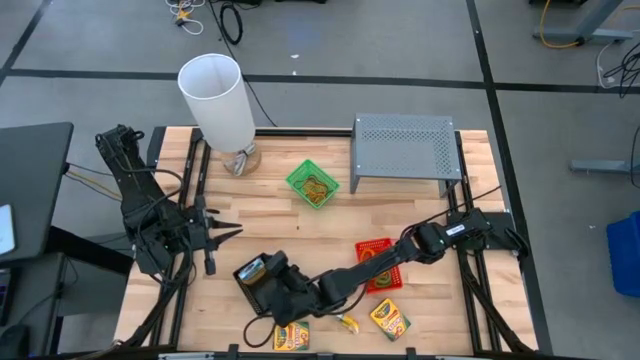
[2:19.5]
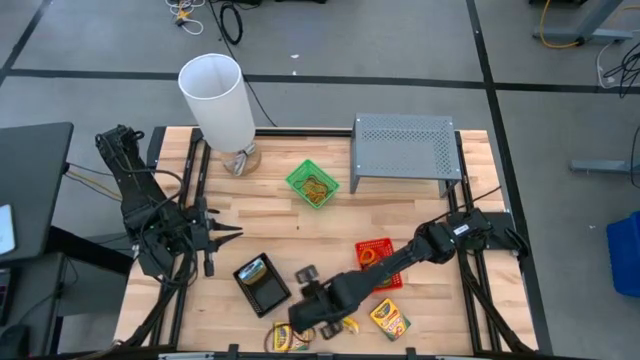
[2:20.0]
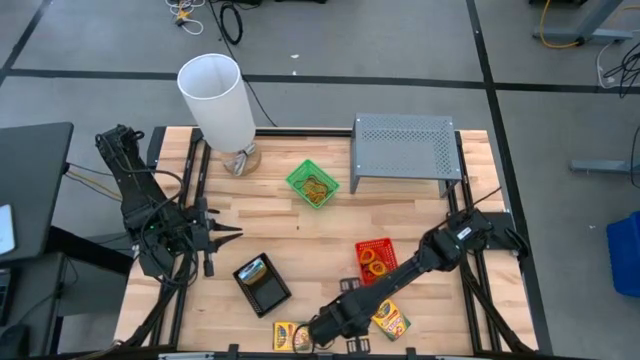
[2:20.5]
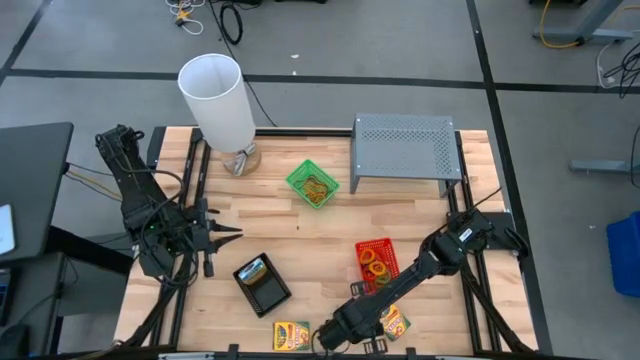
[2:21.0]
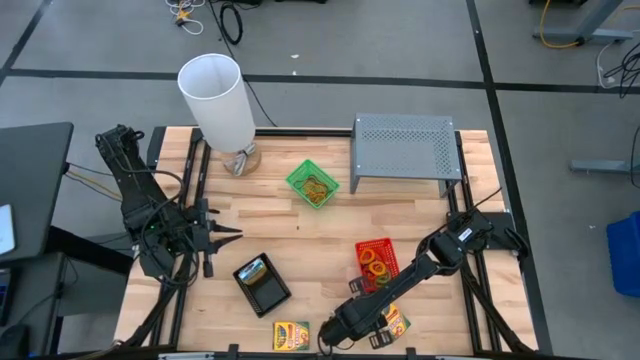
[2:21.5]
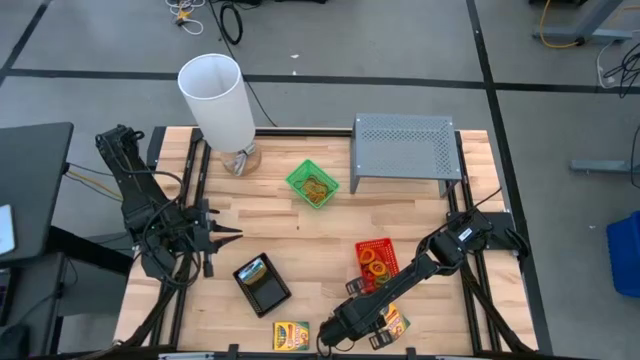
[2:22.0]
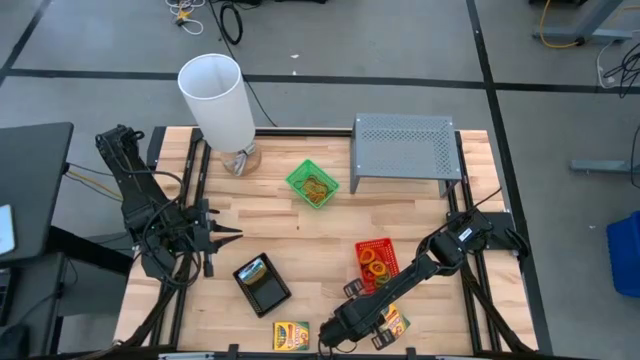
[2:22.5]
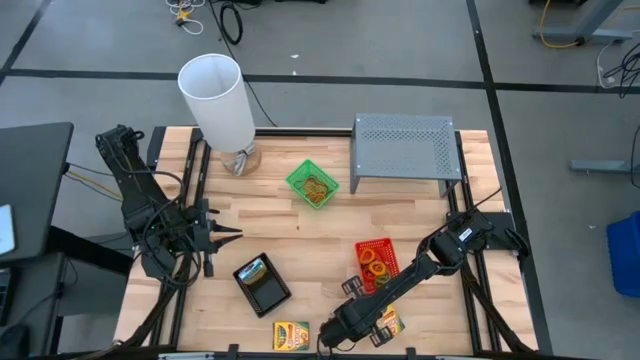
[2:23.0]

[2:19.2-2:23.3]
Task: Pick & Place Office Desk Supplies
Put the yellow crayon box into the black bin

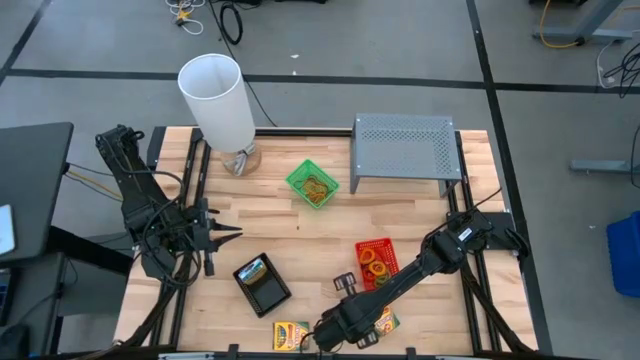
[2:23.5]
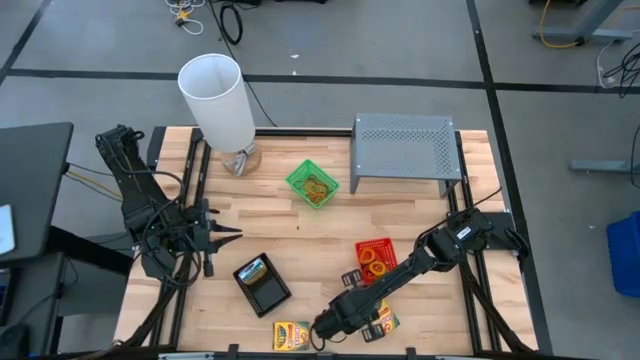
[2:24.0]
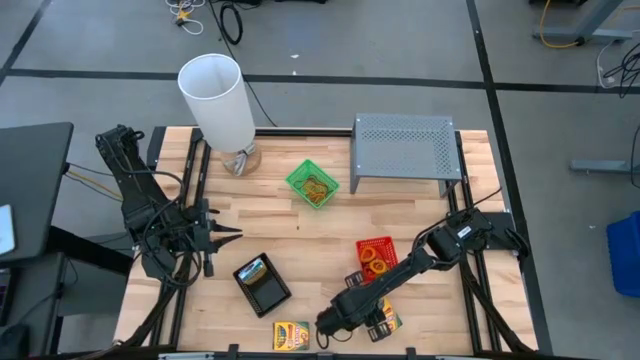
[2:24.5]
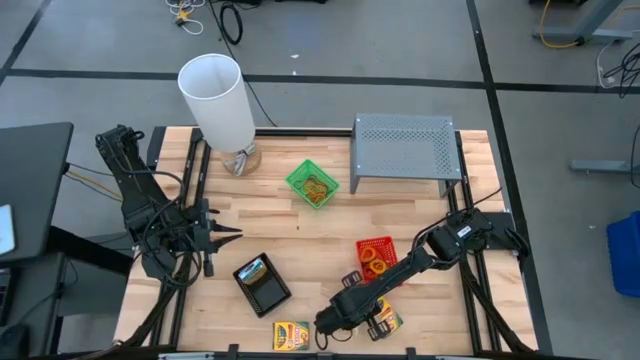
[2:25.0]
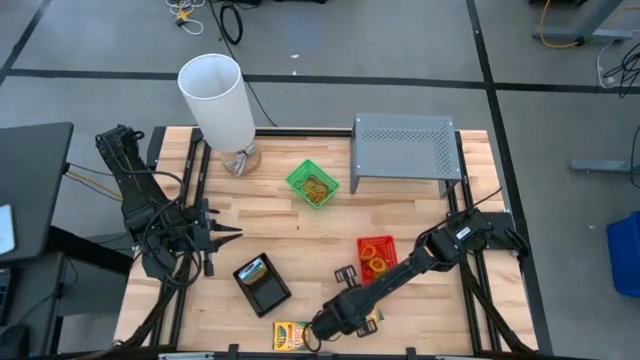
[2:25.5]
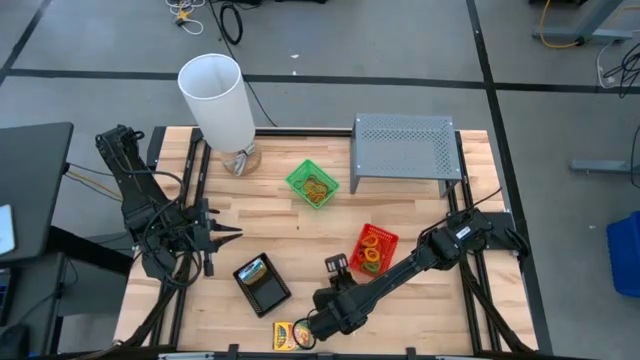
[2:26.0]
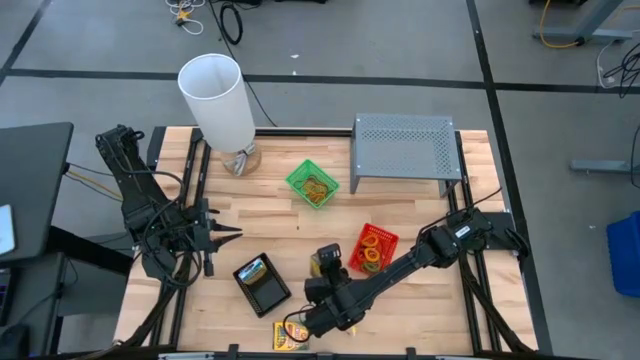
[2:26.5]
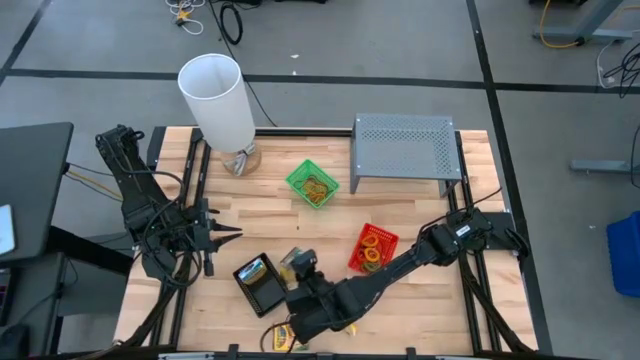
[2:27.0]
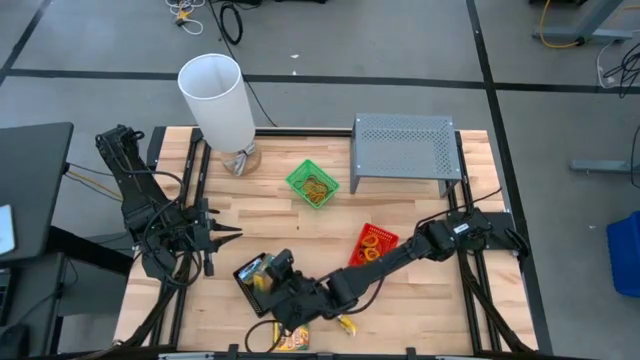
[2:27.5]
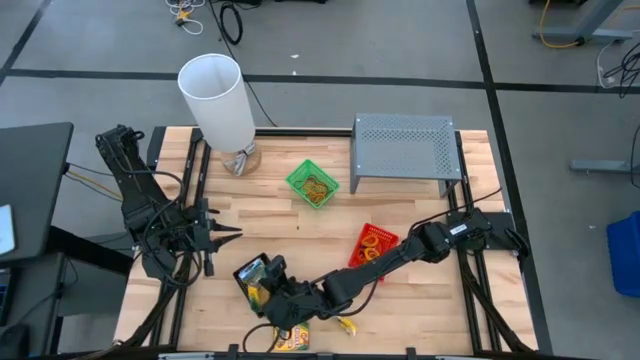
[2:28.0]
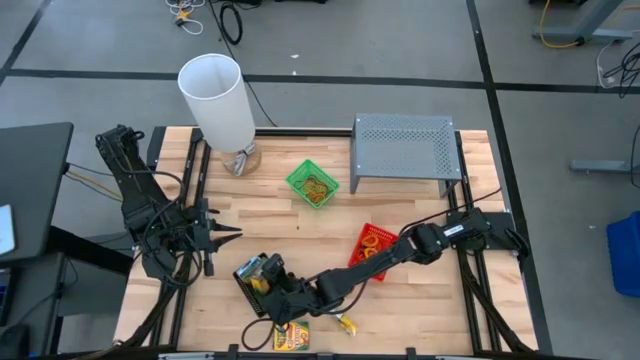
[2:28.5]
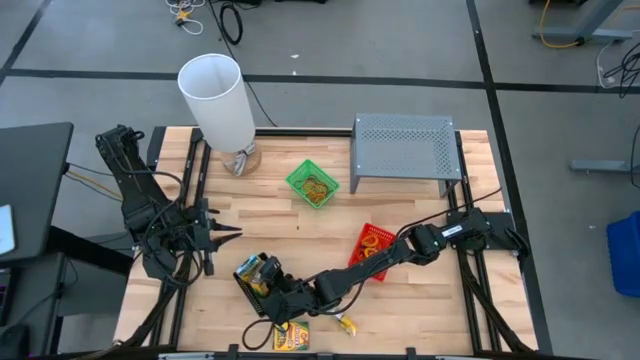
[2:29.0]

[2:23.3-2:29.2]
Put the yellow crayon box into the black bin

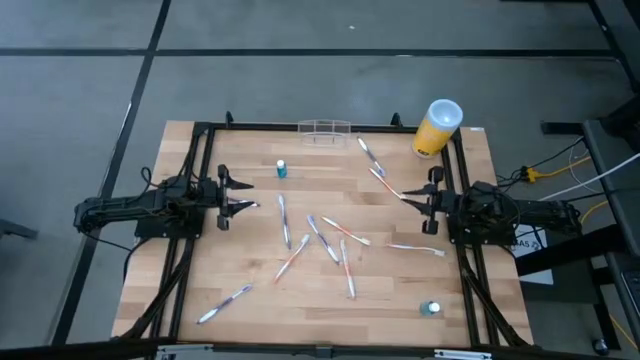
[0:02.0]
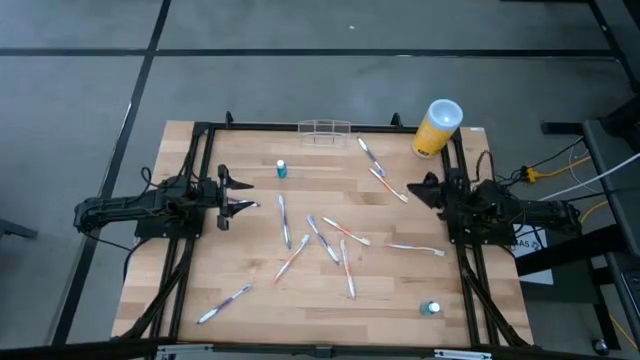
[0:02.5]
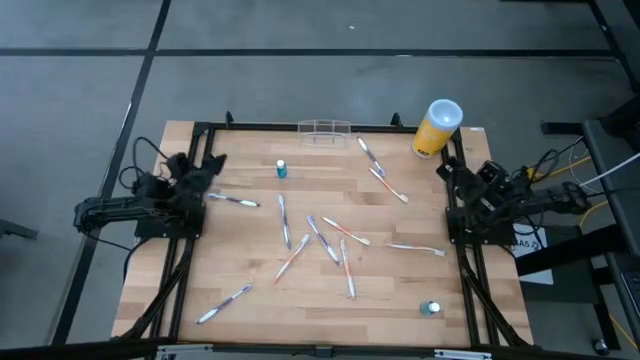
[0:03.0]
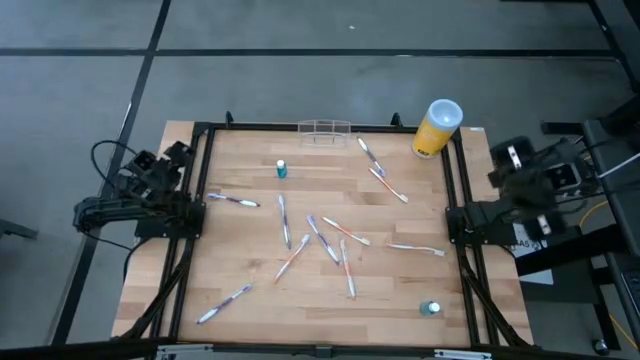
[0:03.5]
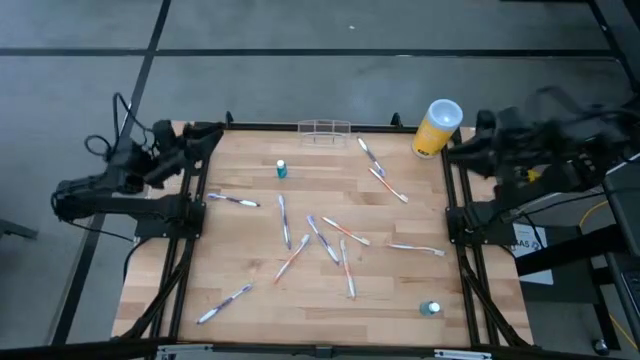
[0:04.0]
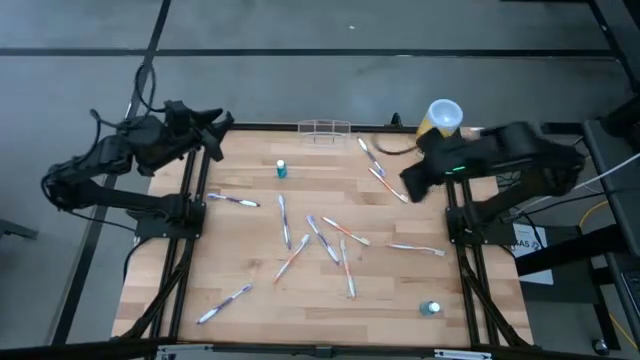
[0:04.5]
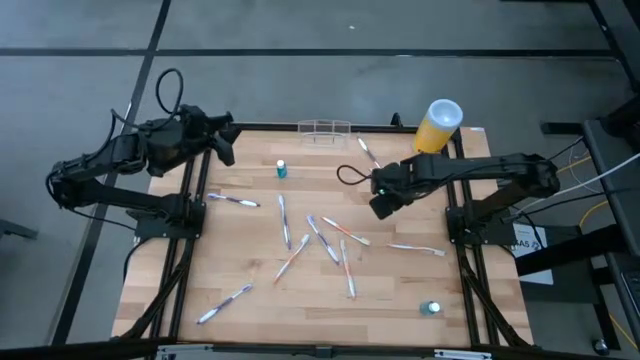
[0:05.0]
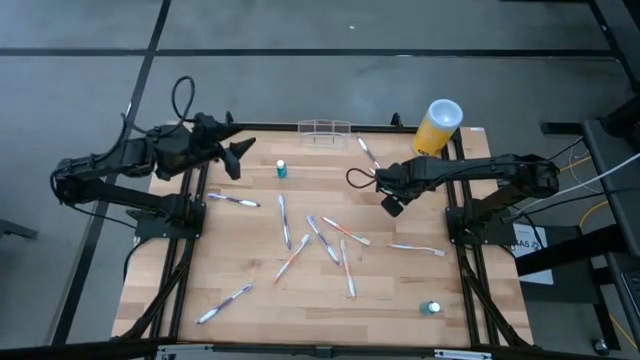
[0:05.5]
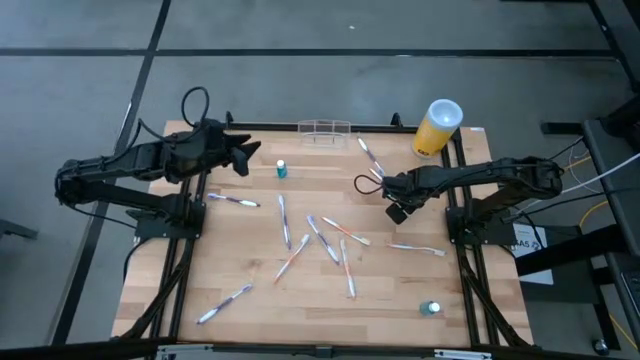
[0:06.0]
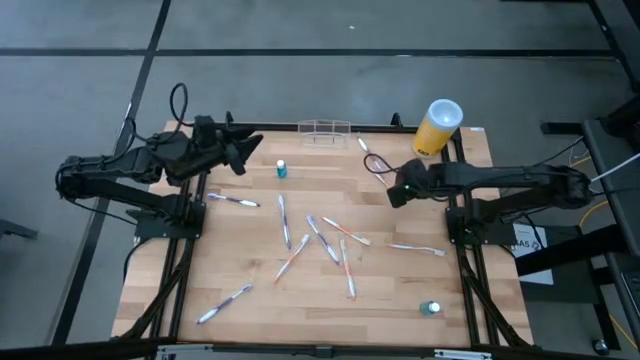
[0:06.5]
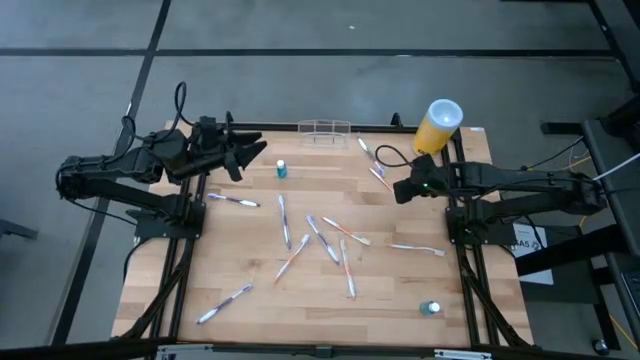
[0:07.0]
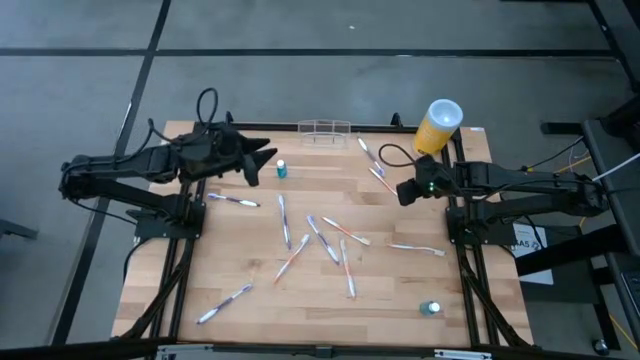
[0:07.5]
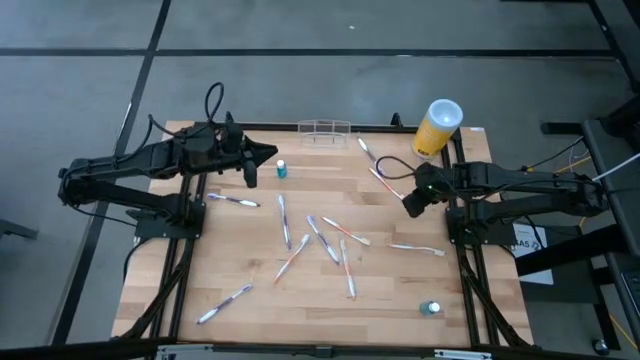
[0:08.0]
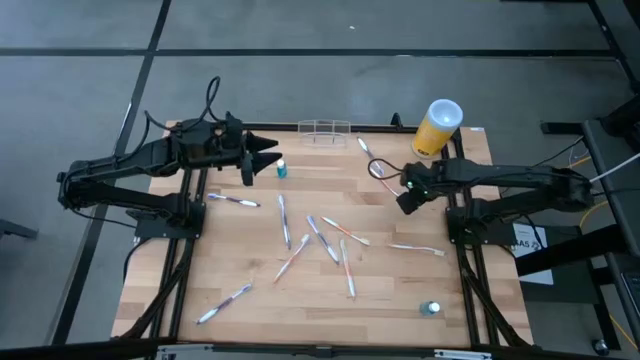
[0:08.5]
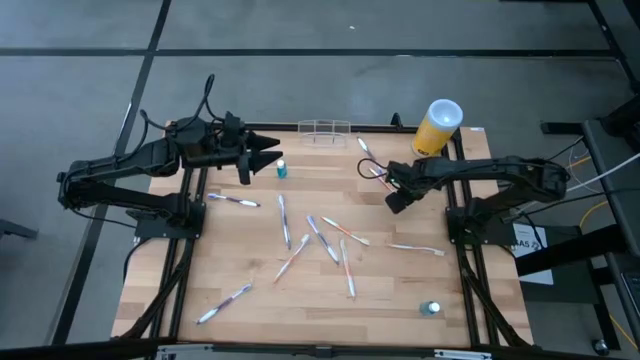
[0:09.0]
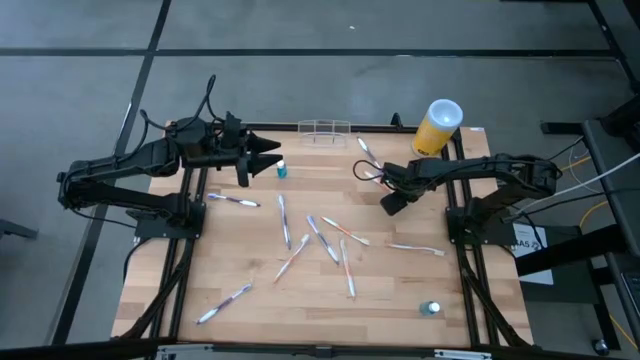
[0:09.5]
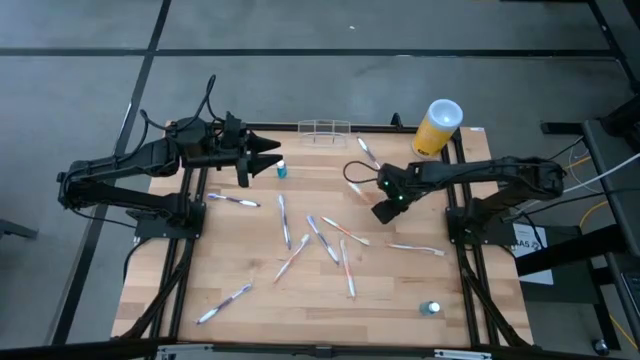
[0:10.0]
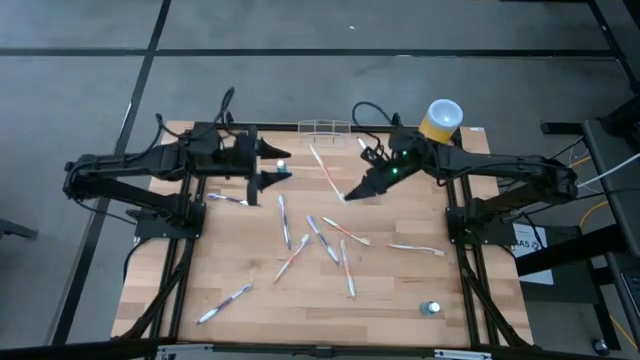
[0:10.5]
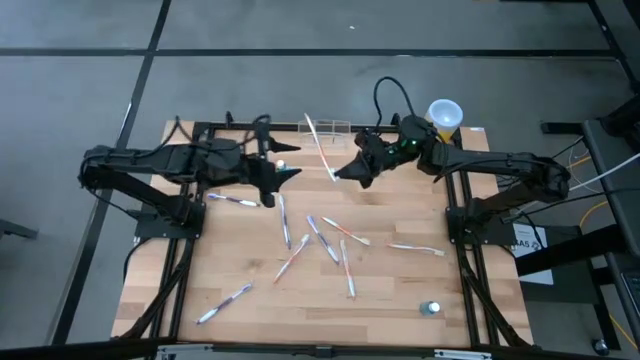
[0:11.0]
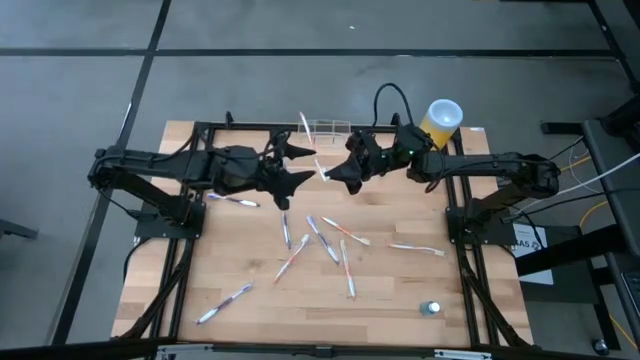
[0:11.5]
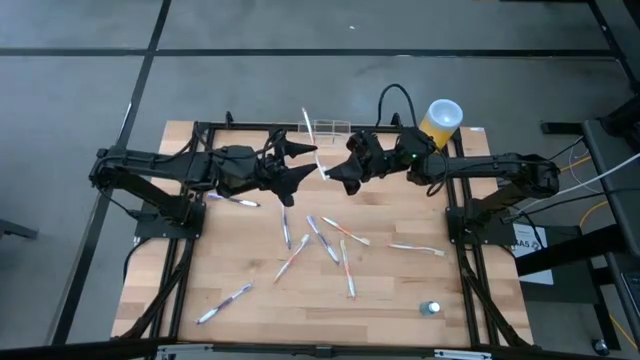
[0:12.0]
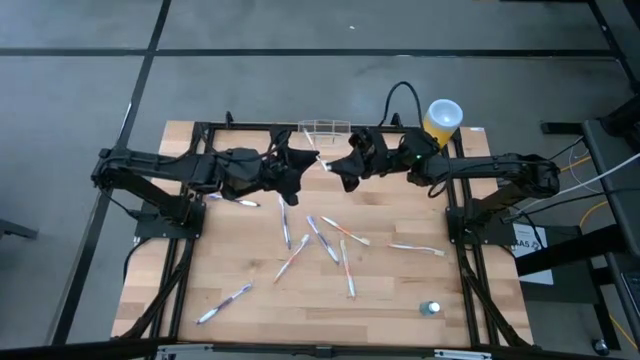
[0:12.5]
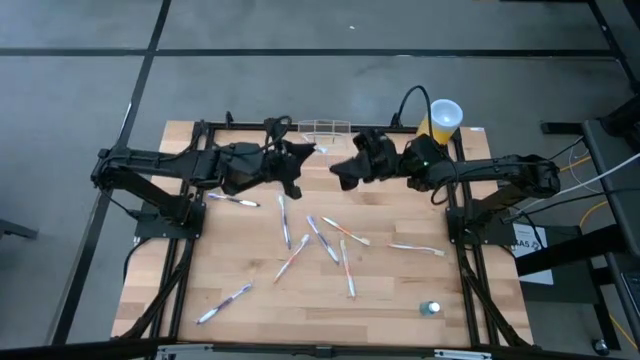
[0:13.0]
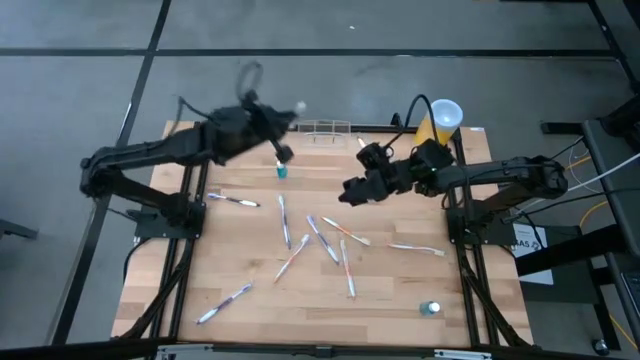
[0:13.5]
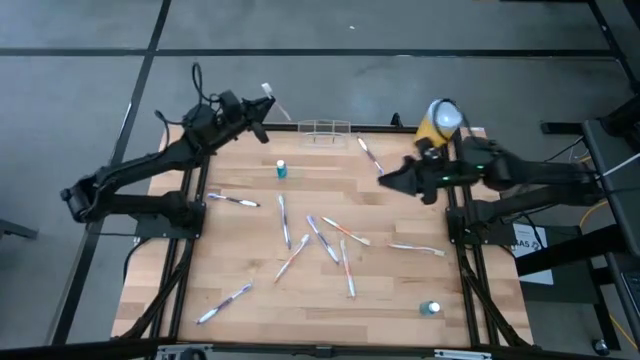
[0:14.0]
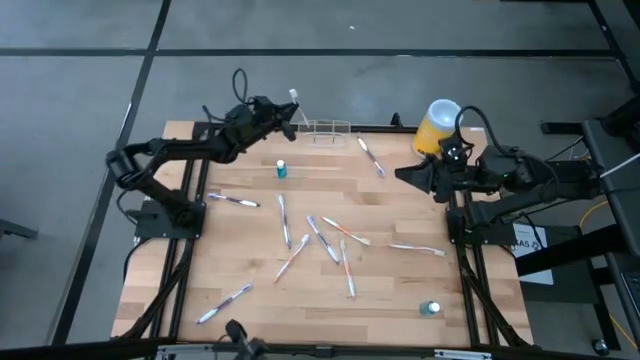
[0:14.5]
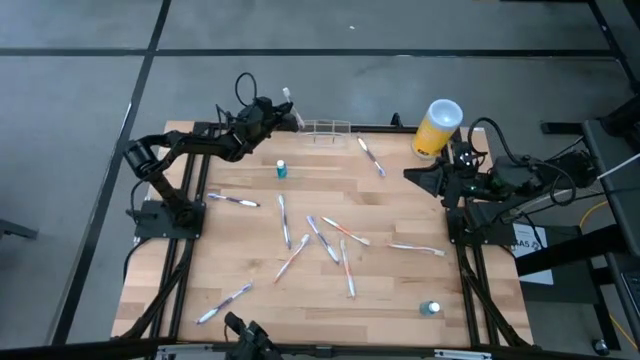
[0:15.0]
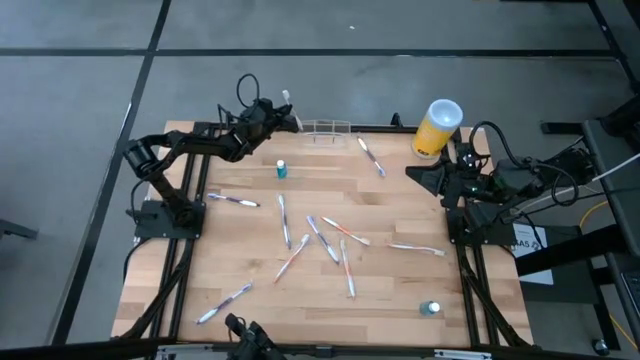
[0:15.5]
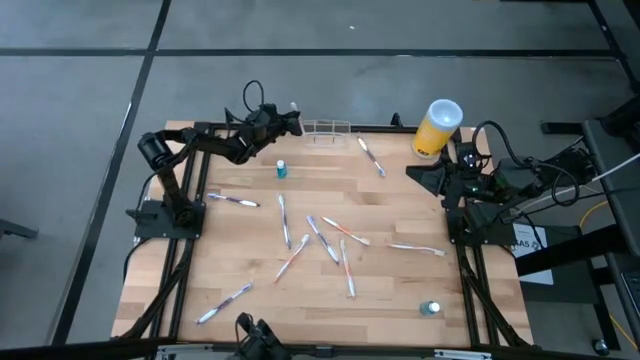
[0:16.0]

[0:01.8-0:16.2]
Task: Pick & Place toothbrushing station
Put the orange toothbrush into the transparent organizer
